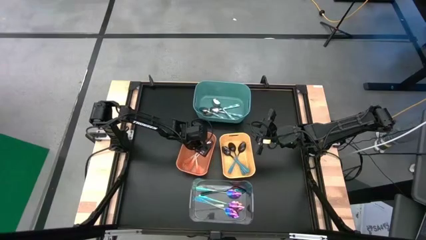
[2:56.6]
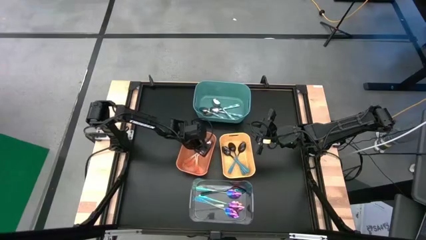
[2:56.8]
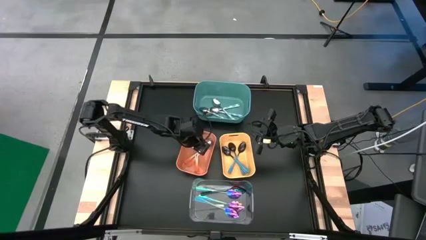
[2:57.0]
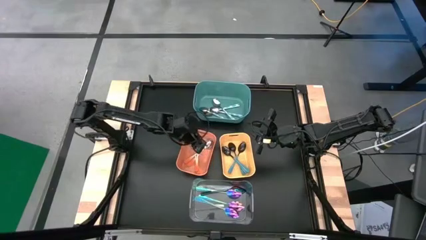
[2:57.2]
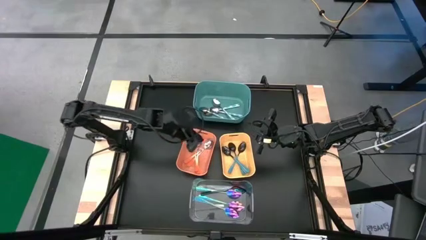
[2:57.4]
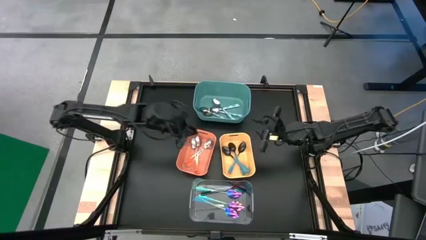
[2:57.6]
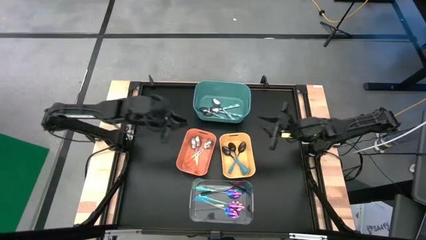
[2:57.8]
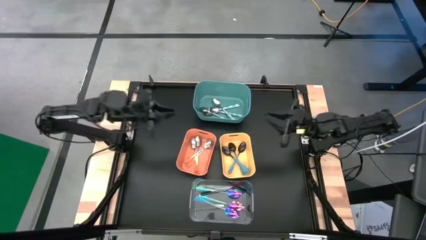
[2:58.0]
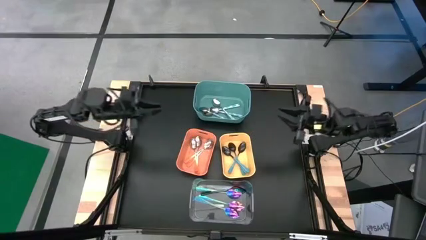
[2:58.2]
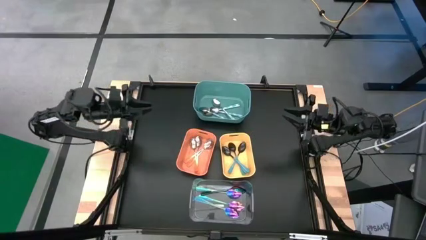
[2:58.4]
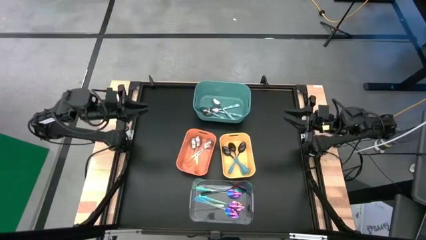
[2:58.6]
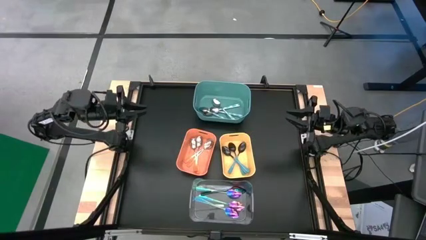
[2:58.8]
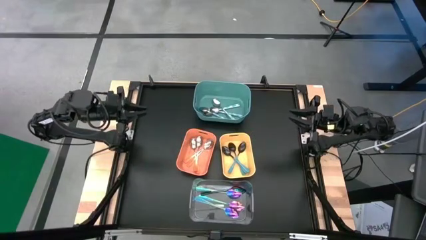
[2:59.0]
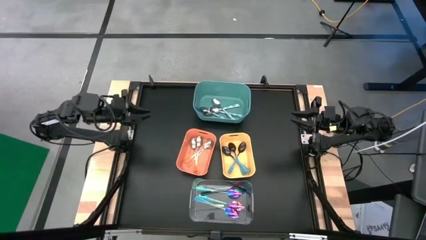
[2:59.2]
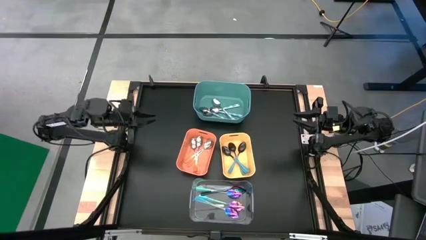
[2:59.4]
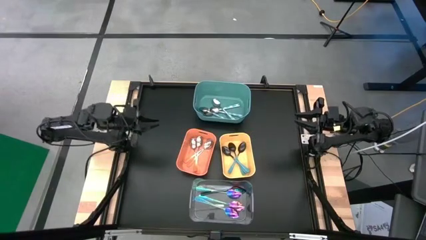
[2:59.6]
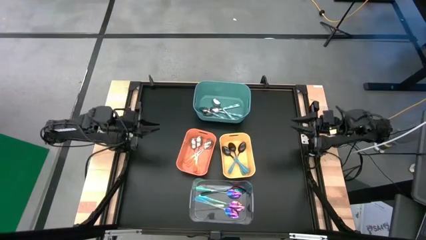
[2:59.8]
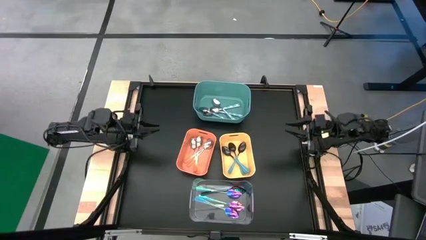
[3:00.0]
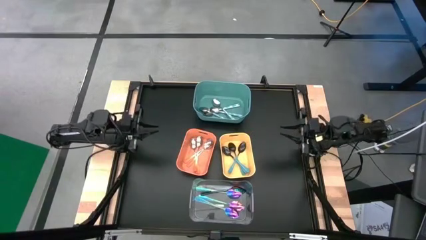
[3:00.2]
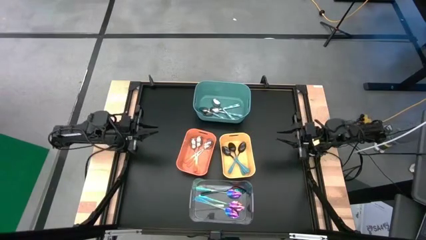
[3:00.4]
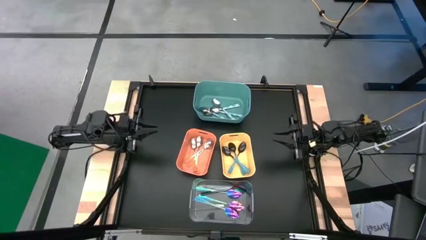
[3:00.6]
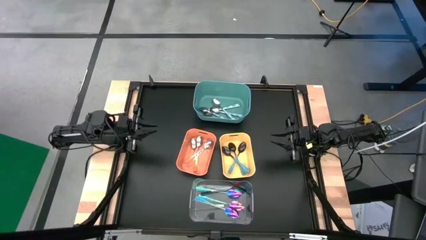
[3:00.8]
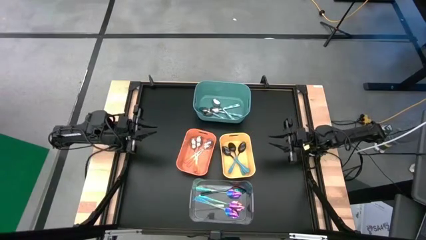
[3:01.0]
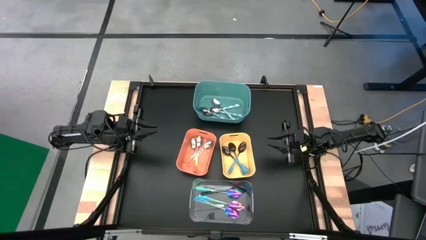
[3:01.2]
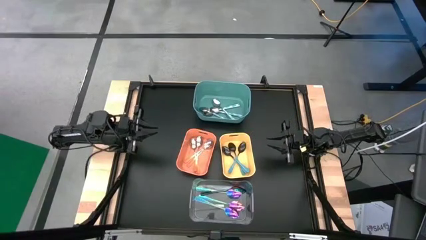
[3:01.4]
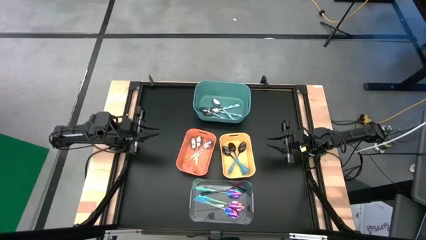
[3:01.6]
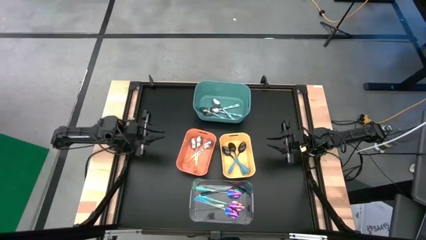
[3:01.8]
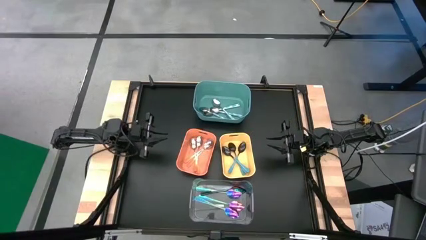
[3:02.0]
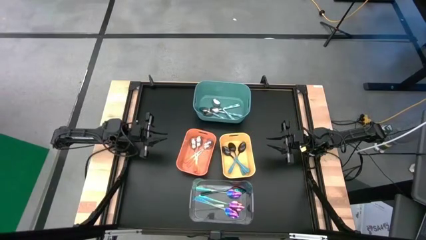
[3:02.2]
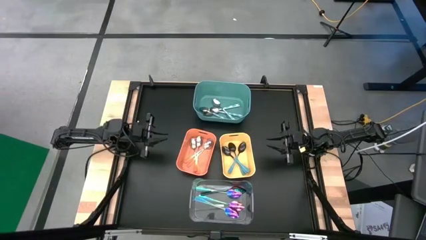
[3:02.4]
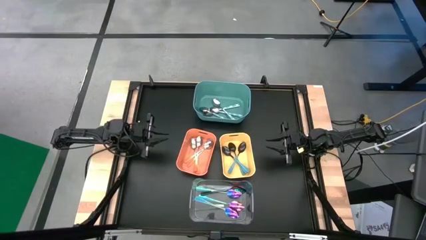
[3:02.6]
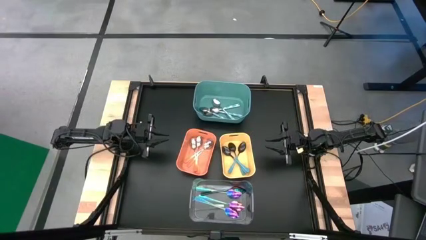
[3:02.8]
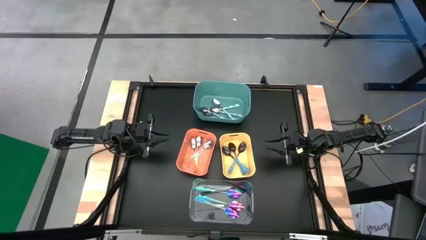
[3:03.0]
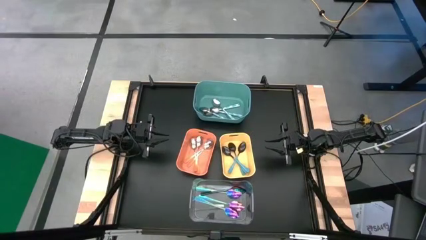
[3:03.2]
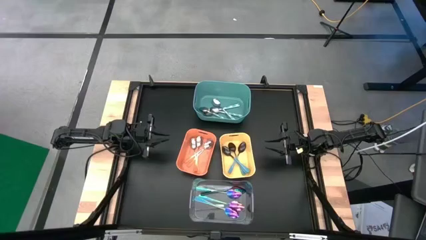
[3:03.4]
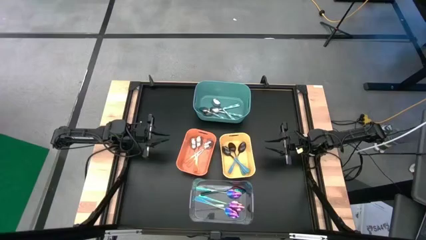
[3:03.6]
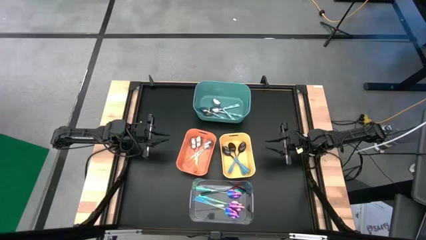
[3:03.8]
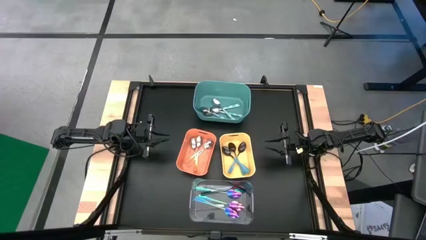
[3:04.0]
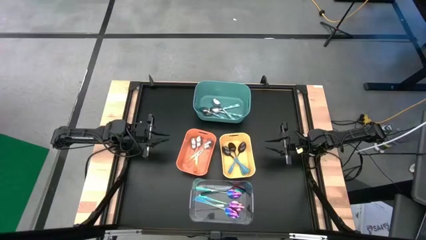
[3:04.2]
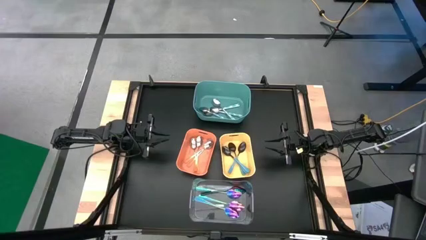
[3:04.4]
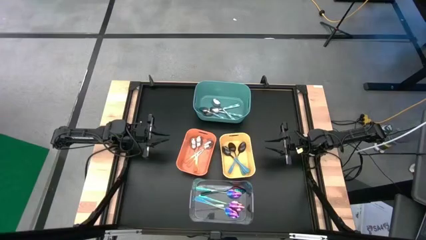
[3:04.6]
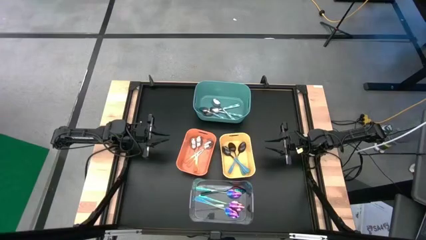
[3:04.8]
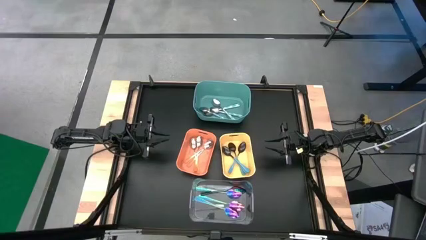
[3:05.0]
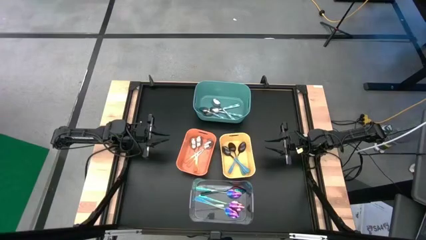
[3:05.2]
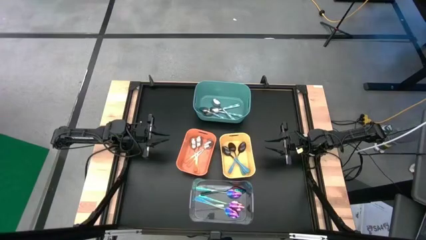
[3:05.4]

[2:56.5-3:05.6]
Task: Sort silverware by color (type)
Return to Home Position

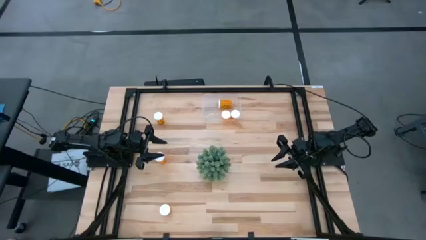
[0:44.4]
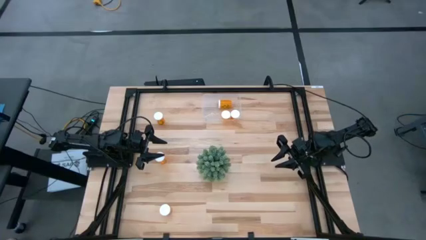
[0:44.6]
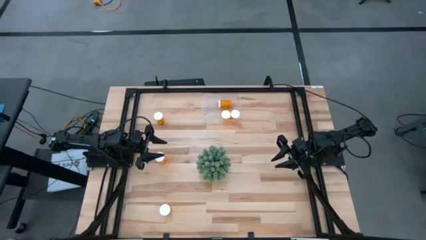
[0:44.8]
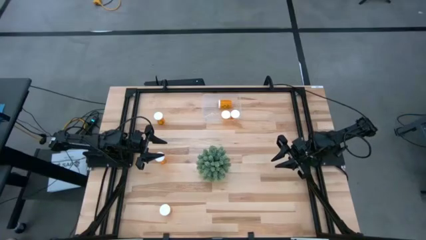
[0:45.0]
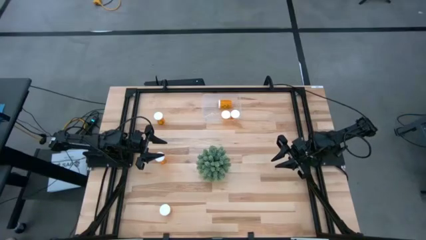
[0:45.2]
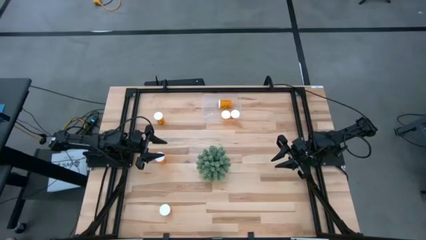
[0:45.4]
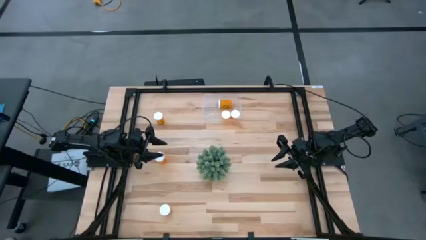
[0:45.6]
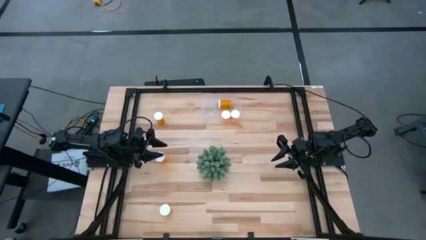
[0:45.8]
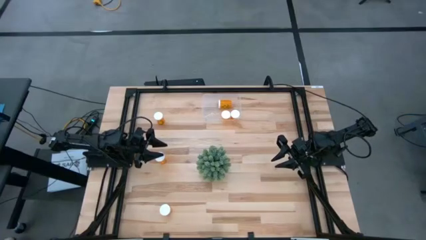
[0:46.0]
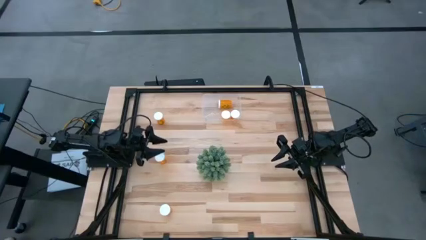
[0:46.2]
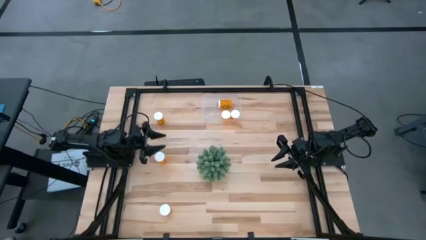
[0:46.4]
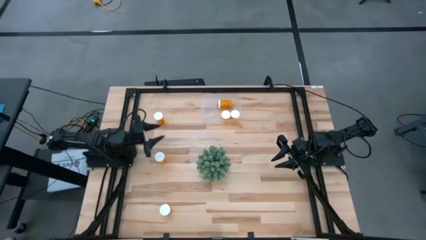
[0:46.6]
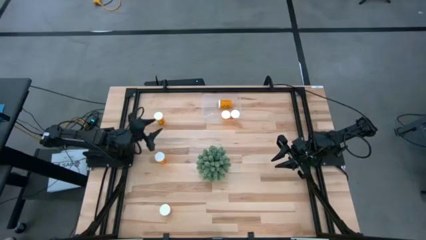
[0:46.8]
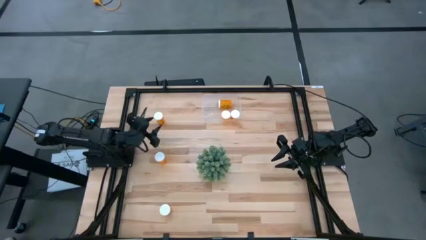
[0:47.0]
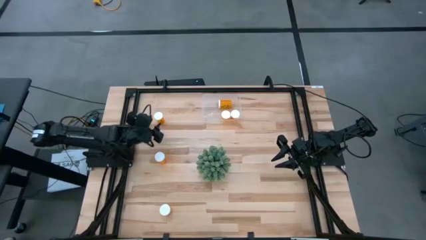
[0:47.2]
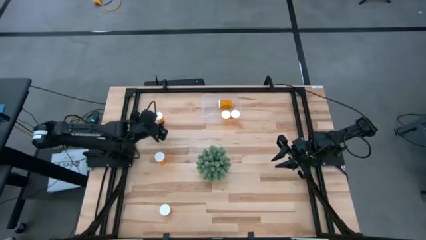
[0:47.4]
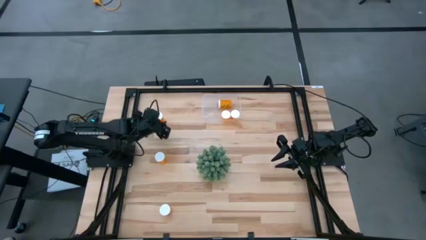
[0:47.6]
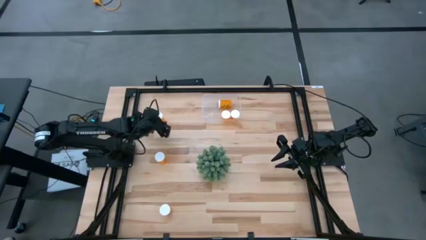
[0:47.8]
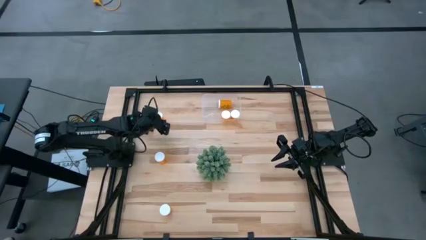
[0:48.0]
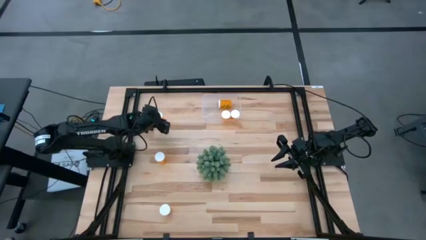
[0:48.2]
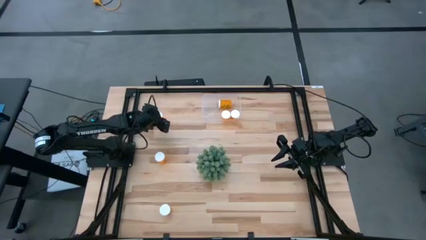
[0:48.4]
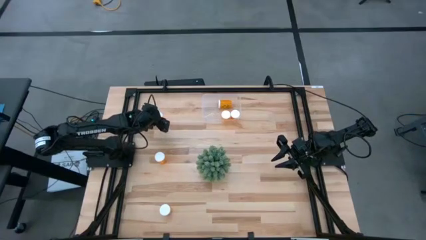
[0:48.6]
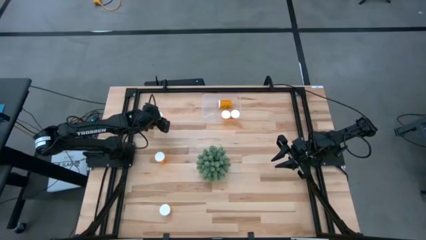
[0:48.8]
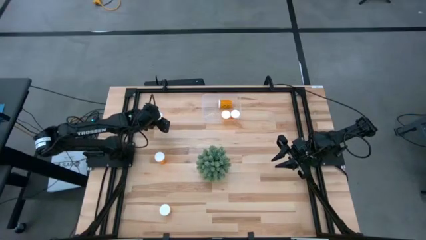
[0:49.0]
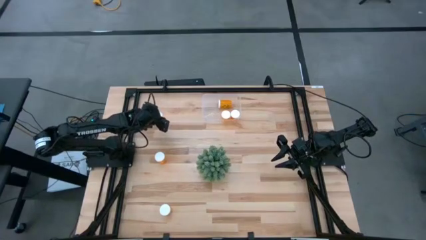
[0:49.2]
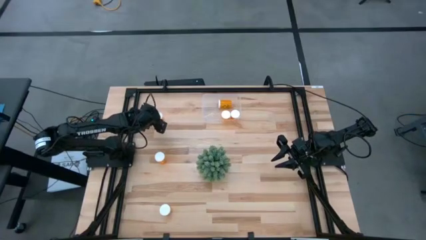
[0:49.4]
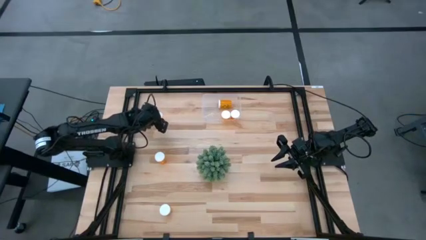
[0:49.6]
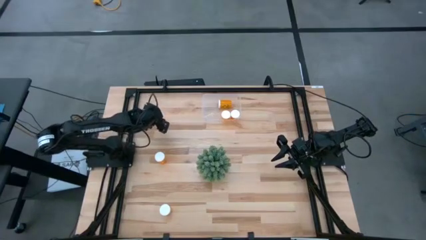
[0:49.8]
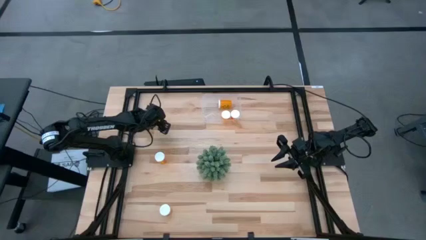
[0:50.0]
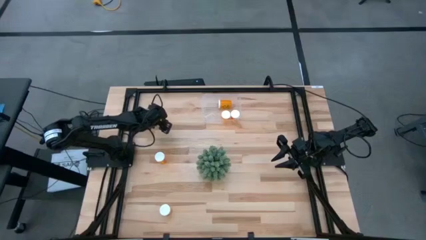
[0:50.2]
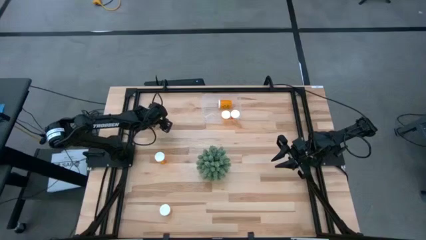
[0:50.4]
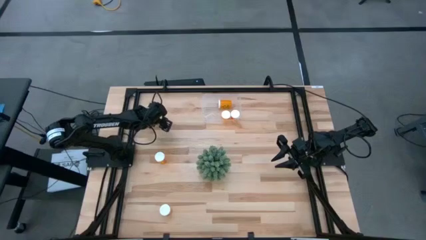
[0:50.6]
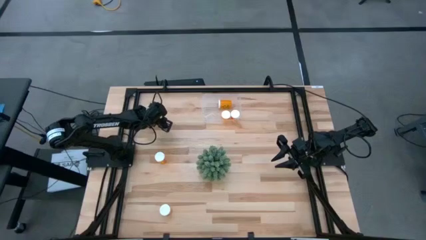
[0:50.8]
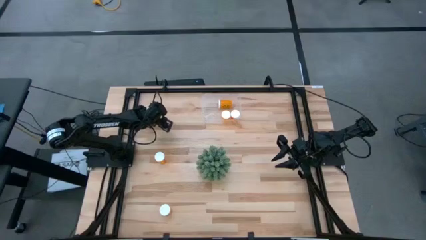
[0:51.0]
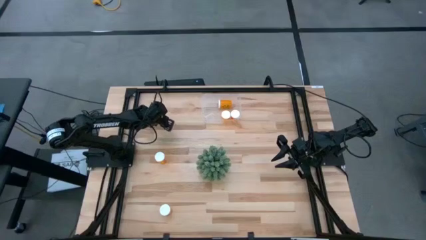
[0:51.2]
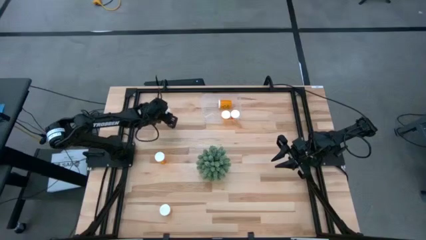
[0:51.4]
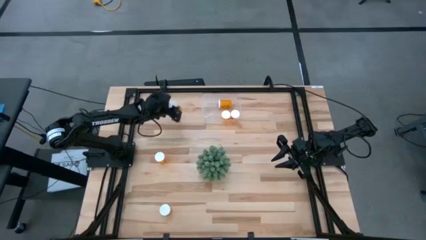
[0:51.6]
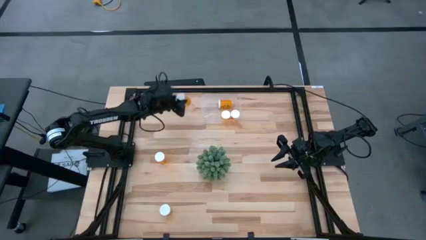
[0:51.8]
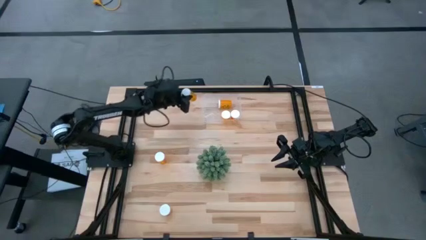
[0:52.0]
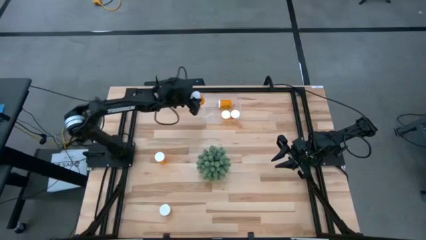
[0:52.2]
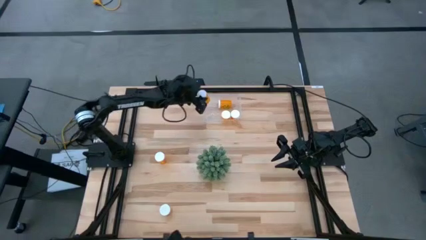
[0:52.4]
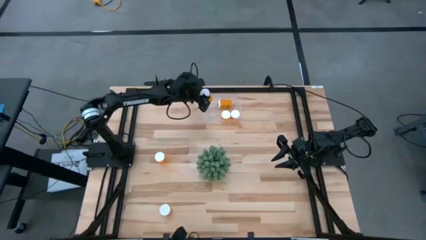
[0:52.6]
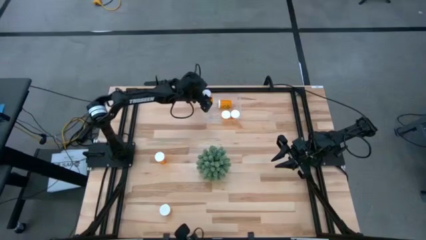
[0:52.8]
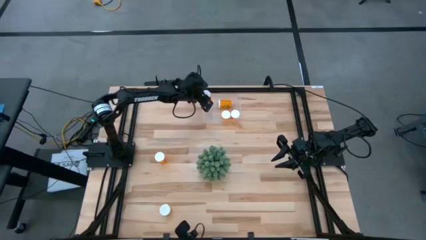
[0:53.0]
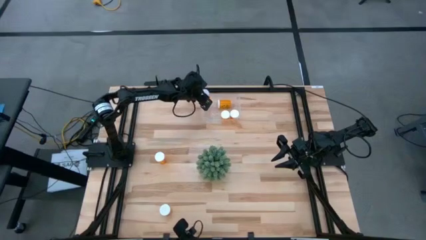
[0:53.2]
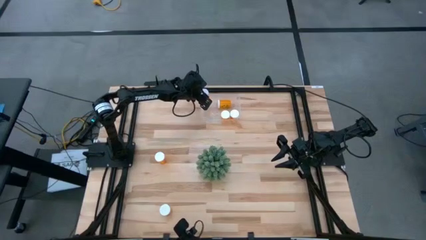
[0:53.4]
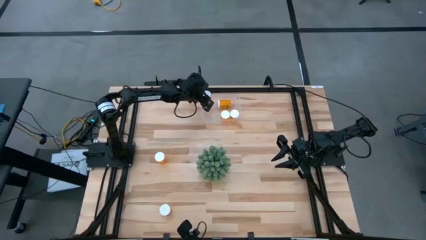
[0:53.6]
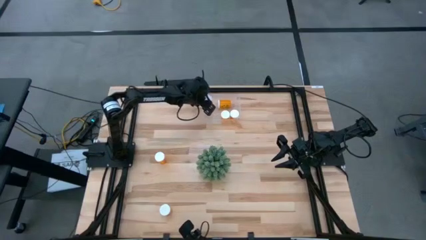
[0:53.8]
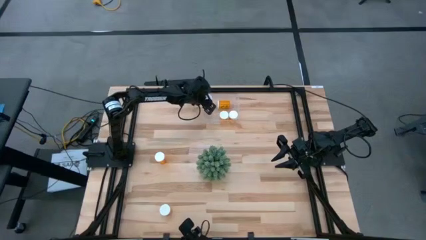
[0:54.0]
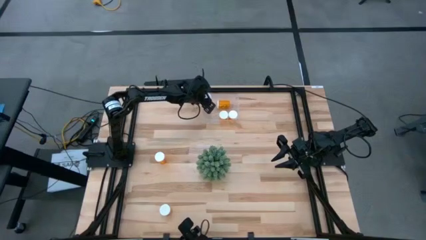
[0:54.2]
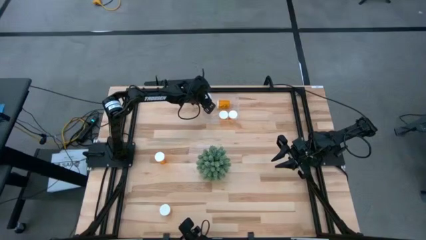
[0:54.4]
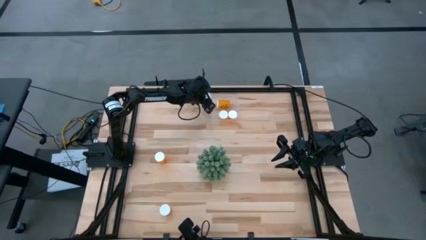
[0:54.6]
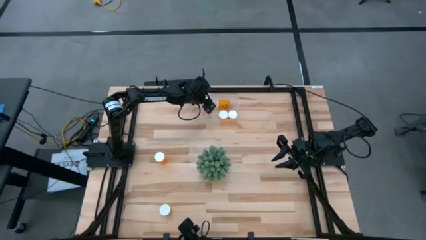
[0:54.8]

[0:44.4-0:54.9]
Task: Pick and place pill bottles into a basket
Put the orange pill bottle into the transparent bin
